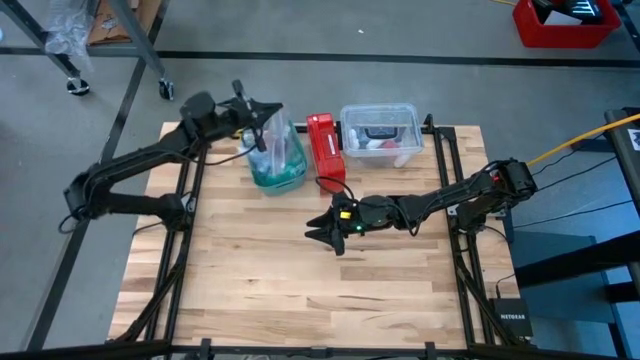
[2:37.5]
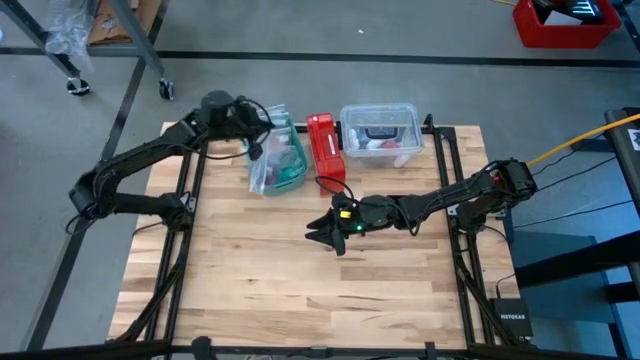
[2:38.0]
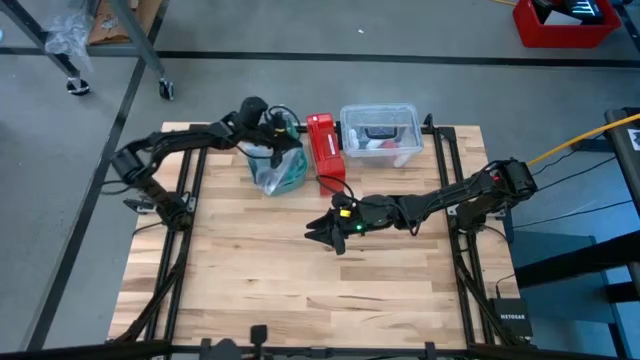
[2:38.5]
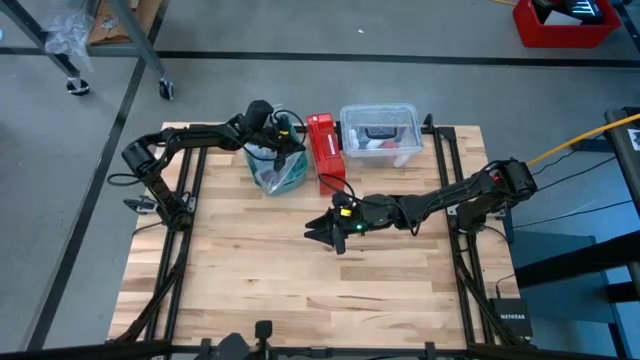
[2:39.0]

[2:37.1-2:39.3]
Task: Roll bandage
Put the transparent zip bag into the green bin

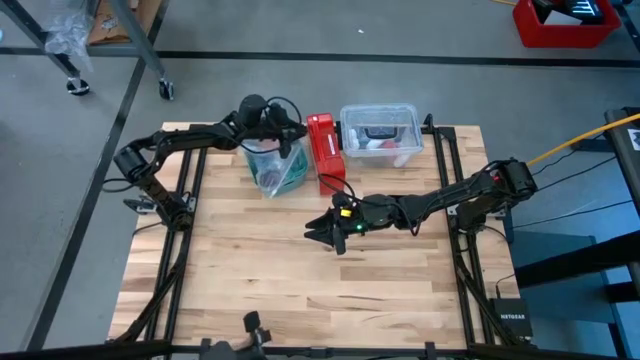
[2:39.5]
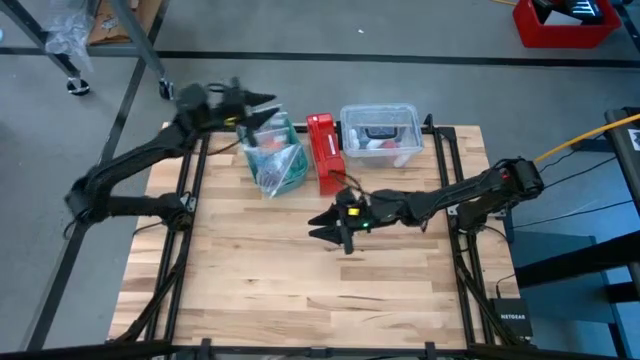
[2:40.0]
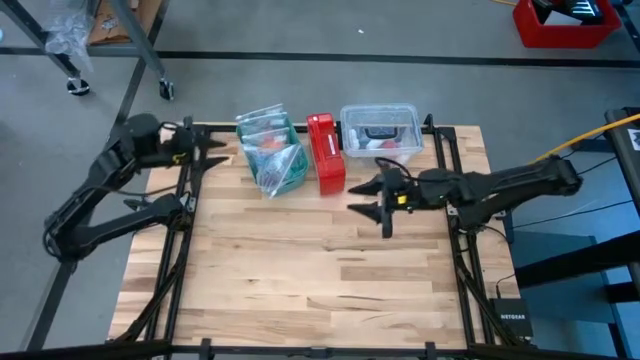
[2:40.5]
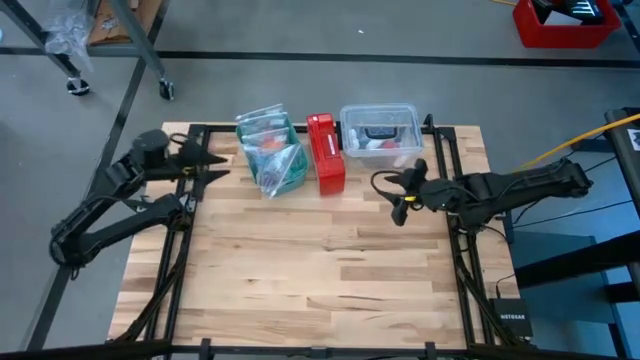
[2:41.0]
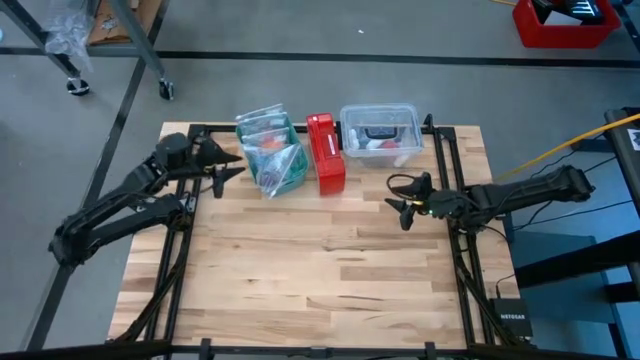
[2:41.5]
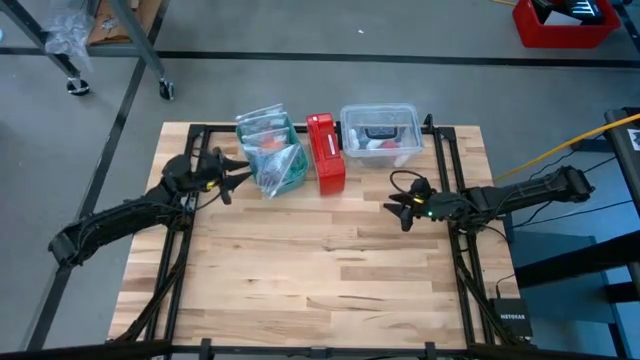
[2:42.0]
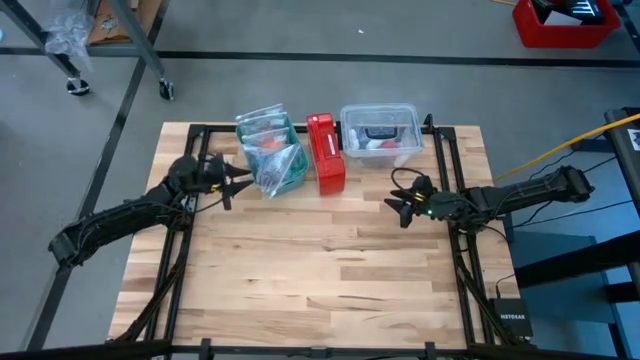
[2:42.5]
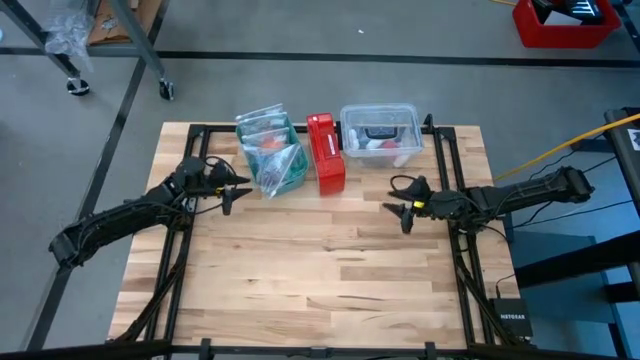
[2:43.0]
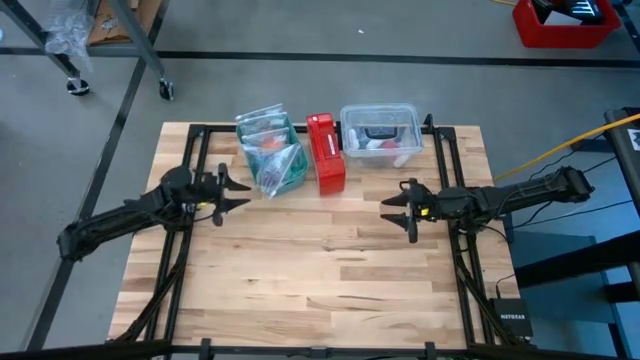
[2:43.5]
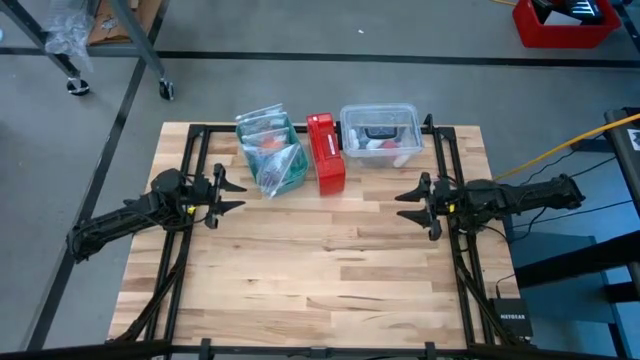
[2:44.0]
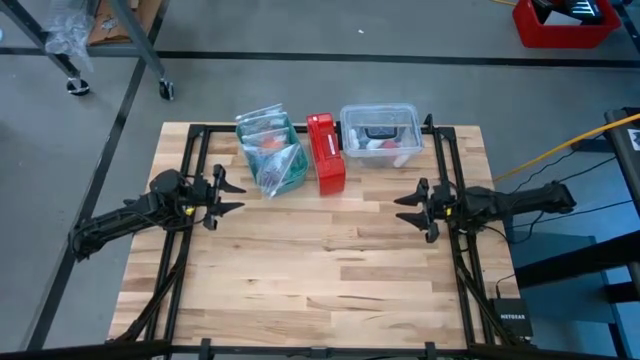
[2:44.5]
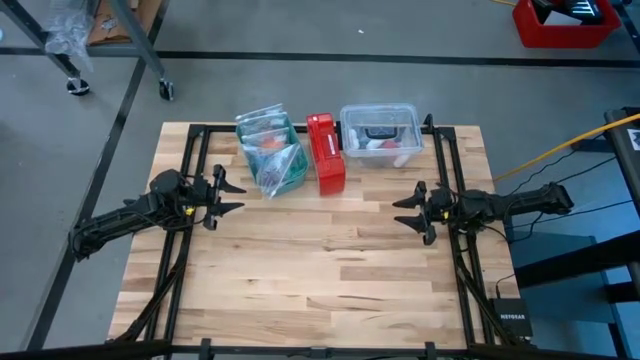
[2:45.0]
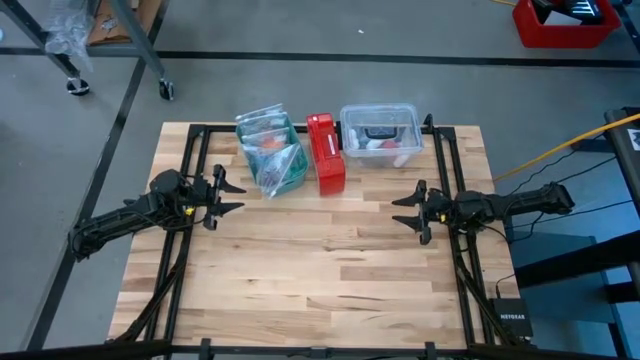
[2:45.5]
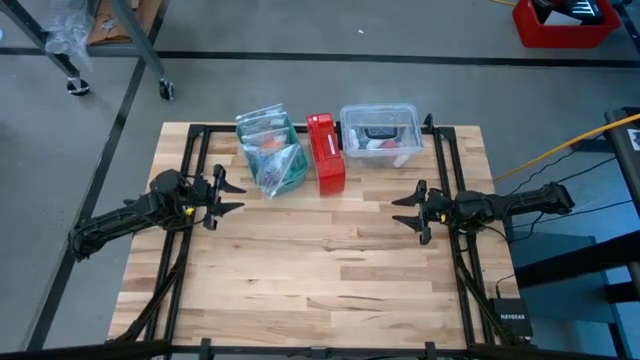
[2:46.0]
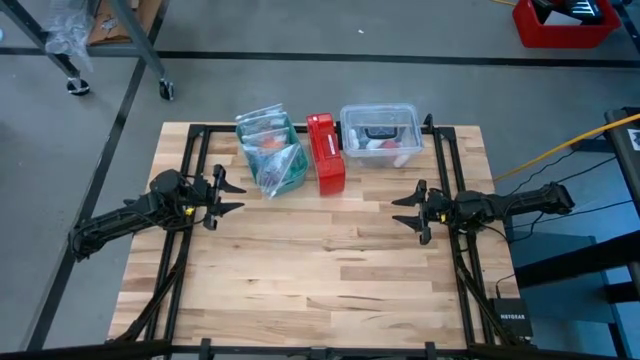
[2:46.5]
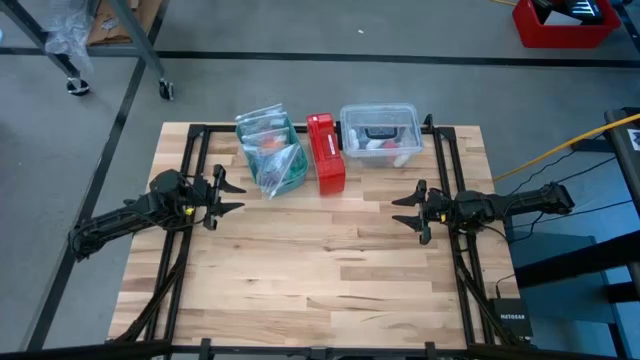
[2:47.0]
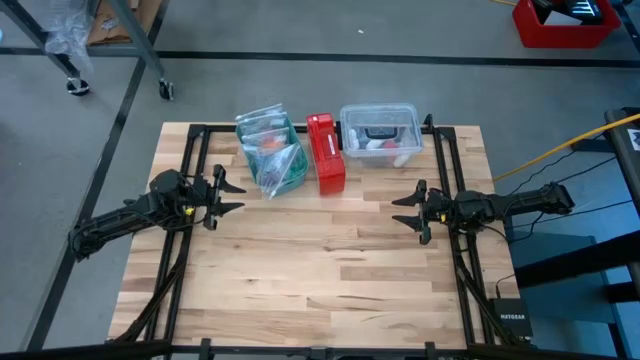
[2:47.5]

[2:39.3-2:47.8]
Return to Home Position

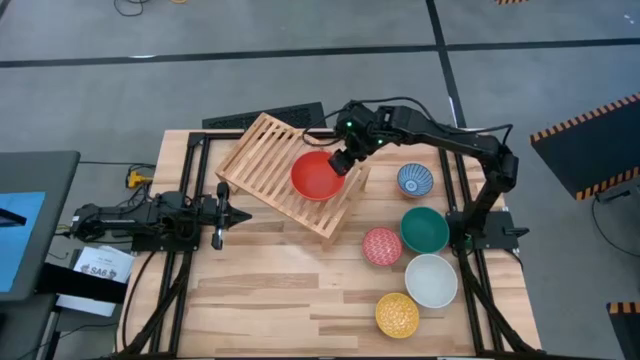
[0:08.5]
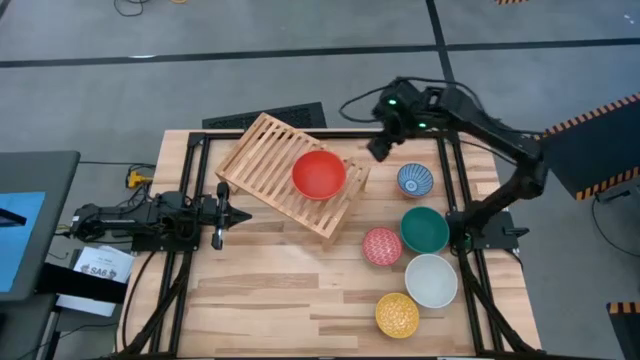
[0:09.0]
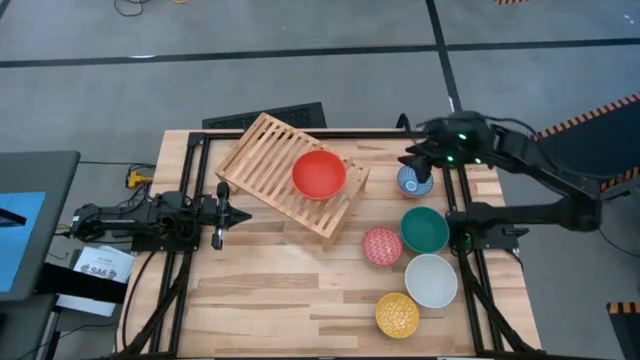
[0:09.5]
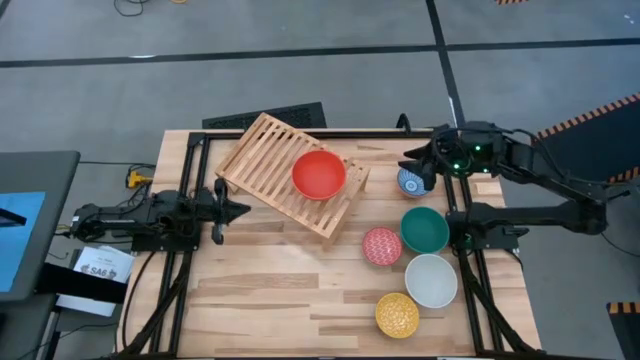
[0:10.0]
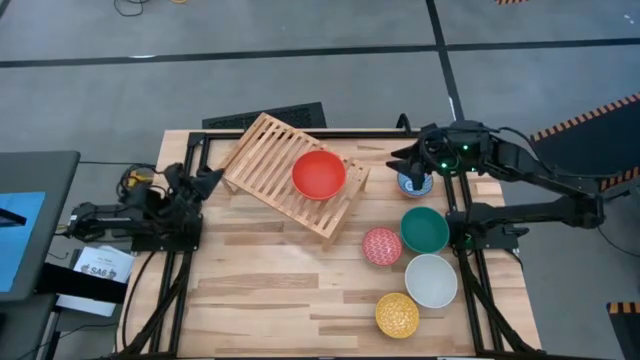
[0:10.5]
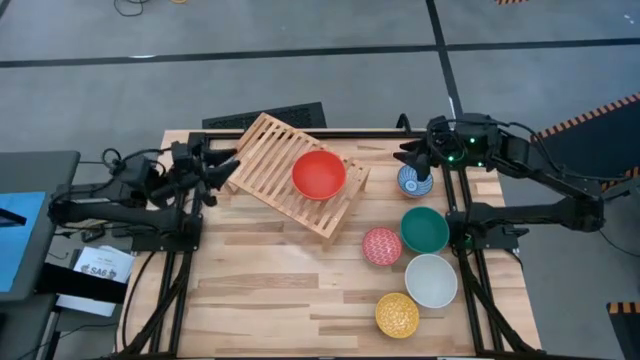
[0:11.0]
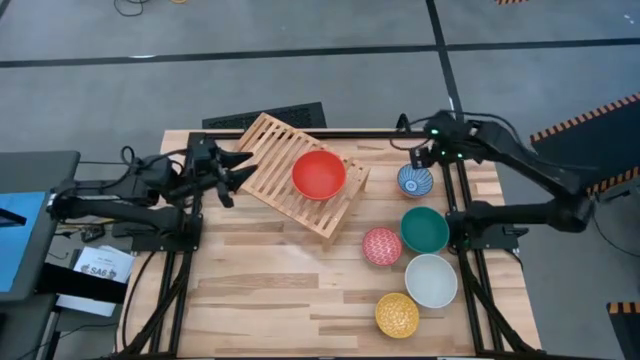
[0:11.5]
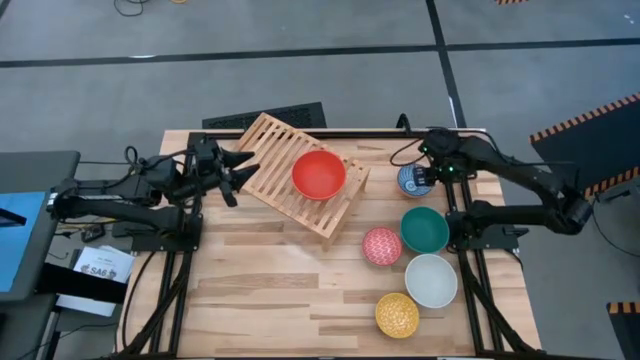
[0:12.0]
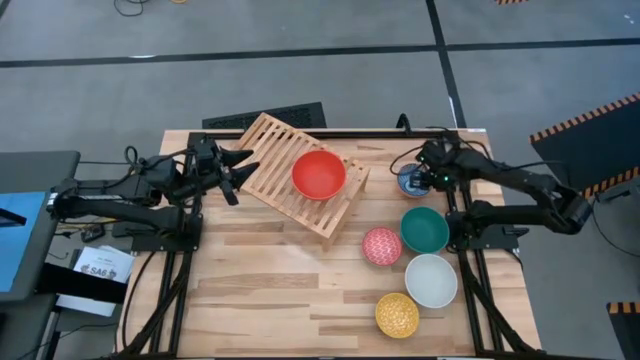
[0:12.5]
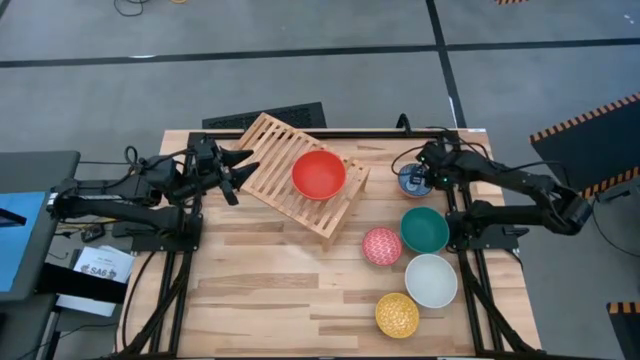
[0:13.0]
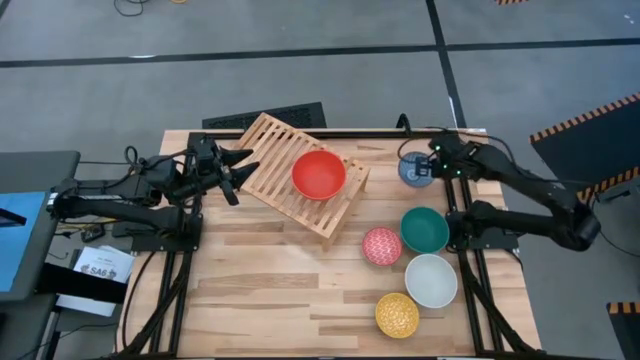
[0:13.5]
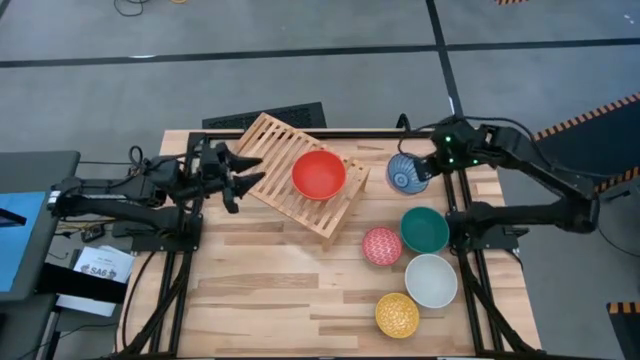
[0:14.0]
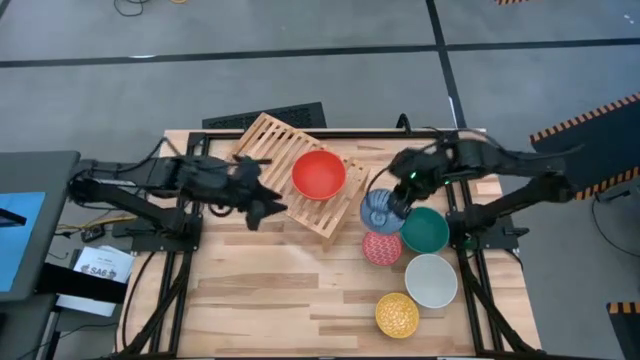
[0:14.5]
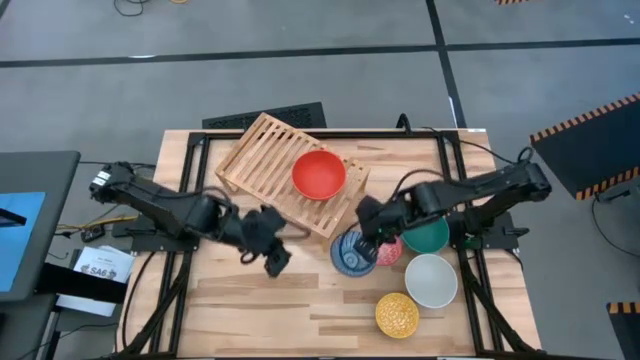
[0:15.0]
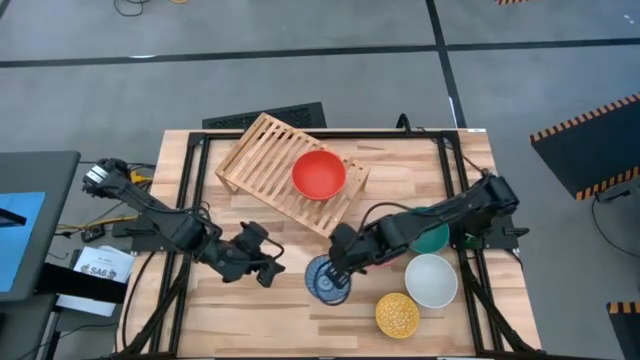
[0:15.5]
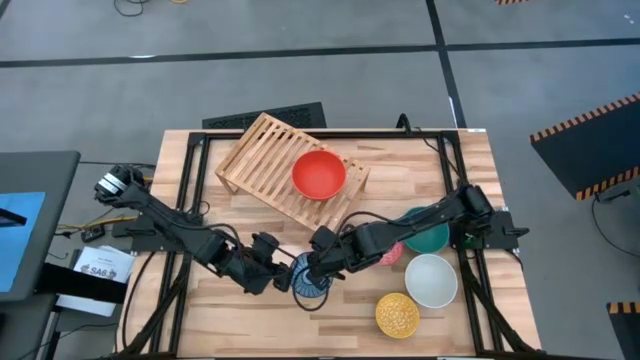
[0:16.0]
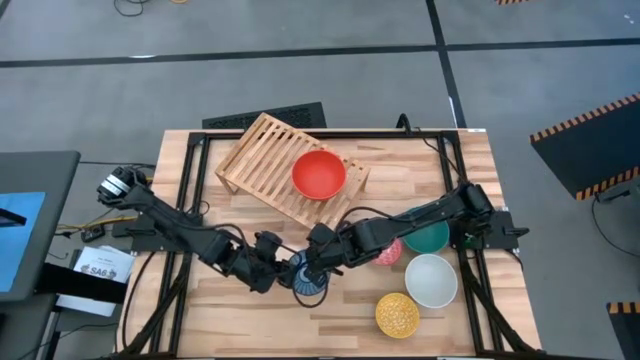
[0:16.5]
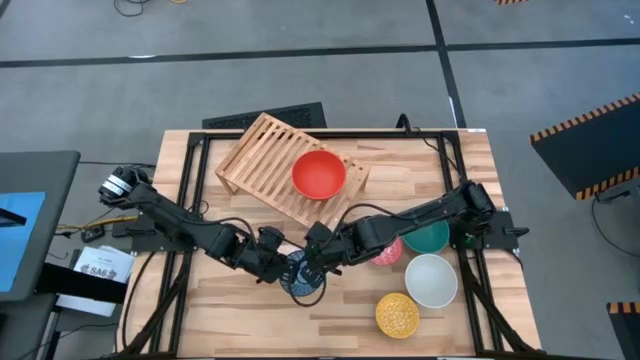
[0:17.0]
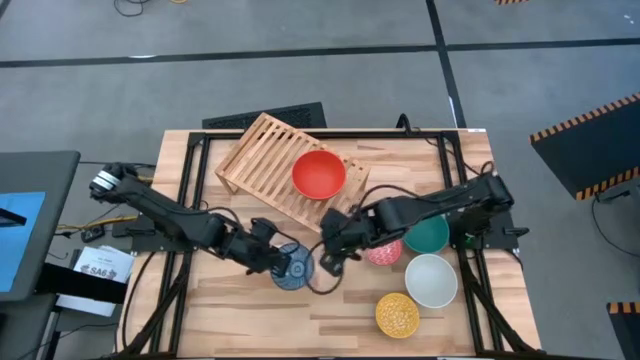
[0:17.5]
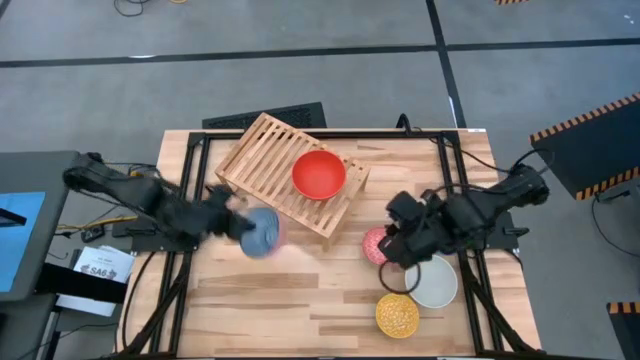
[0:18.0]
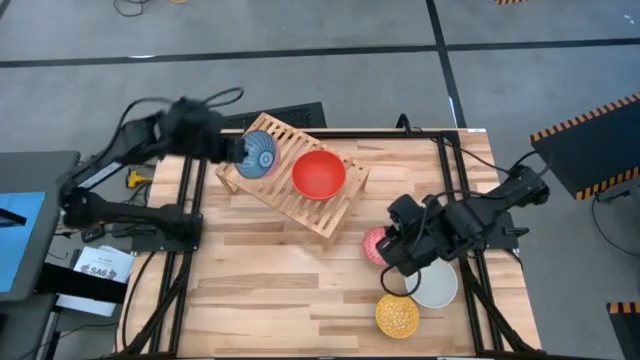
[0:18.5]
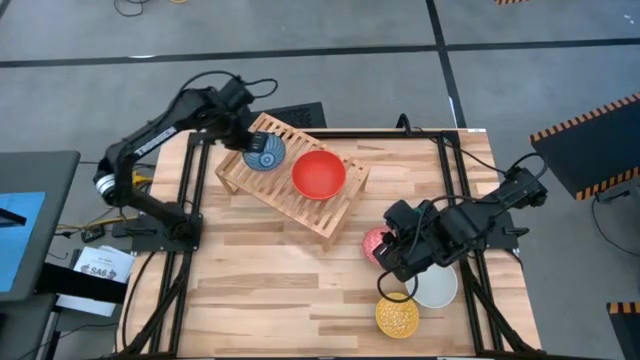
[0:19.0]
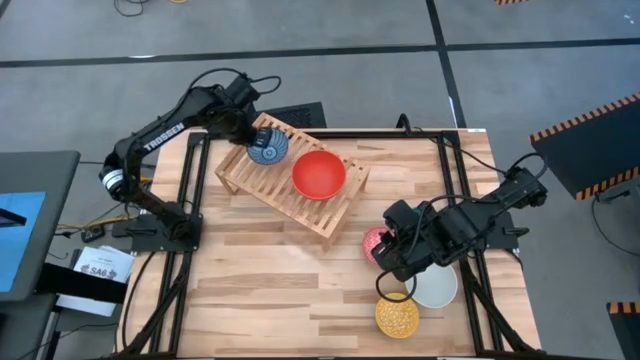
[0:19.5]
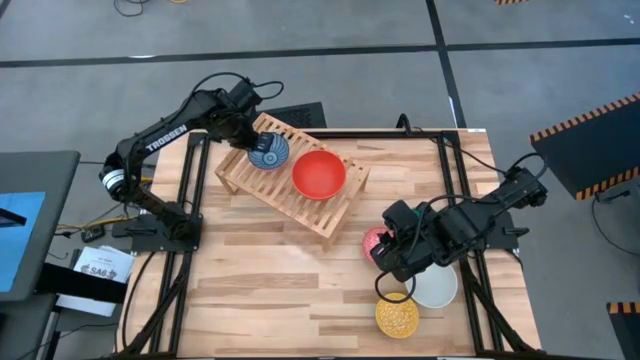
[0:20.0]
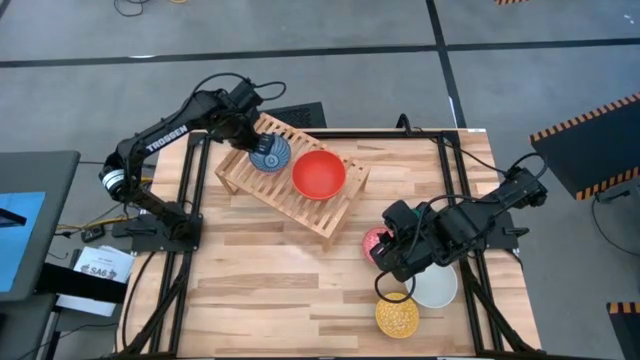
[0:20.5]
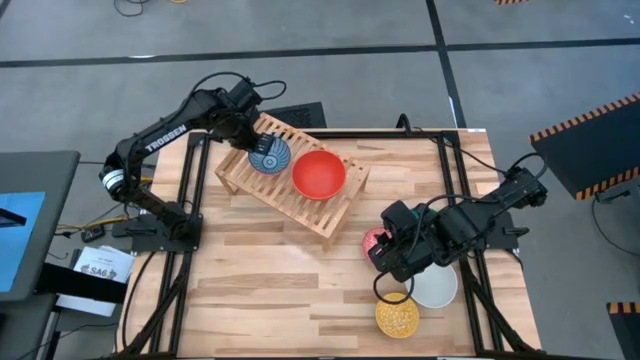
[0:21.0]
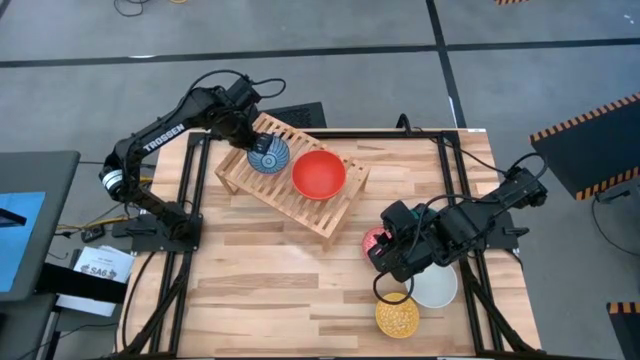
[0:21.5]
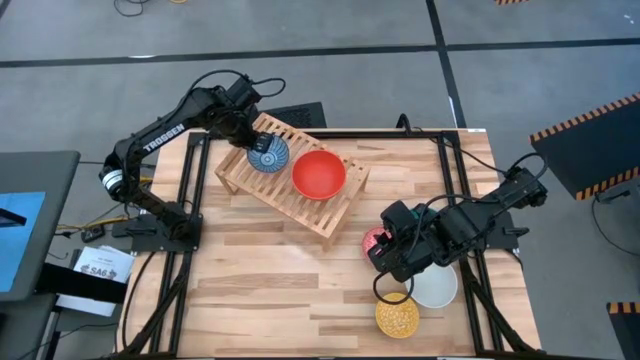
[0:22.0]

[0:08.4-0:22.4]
Task: Place and stack bowls onto a shelf
Put the blue bowl on the shelf
